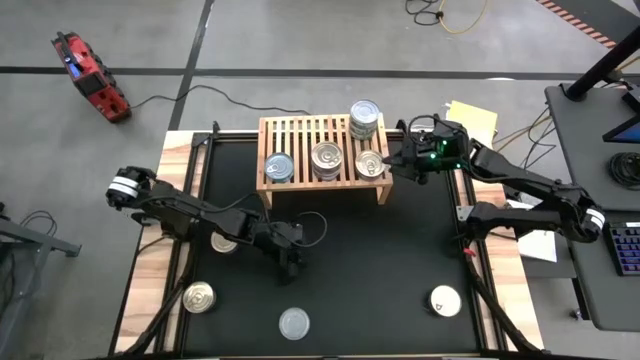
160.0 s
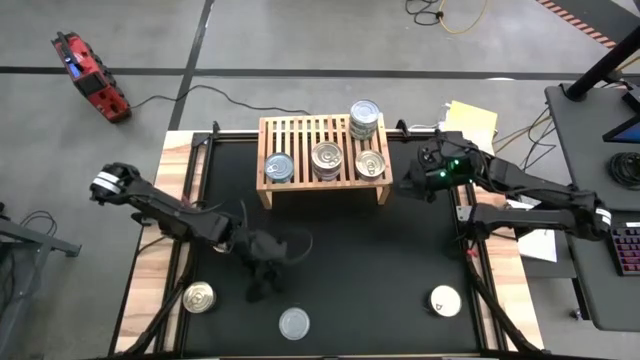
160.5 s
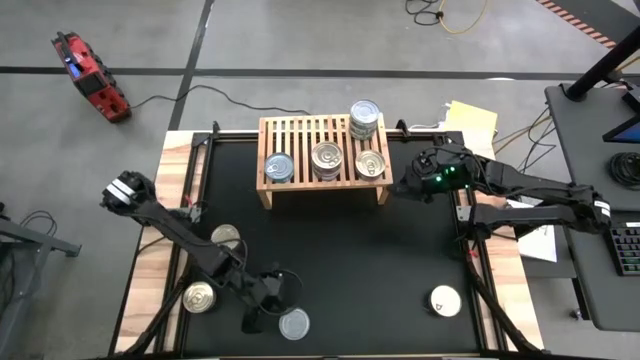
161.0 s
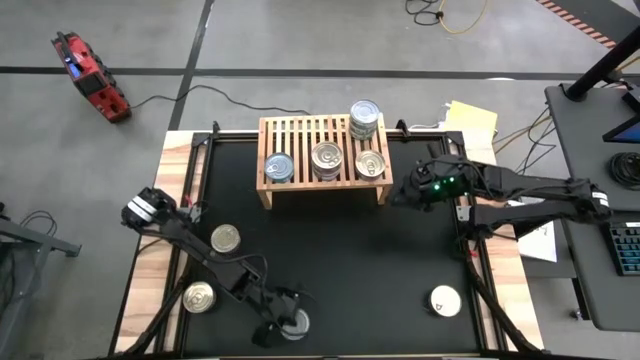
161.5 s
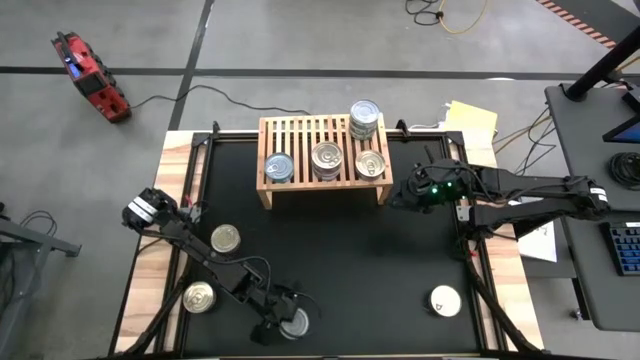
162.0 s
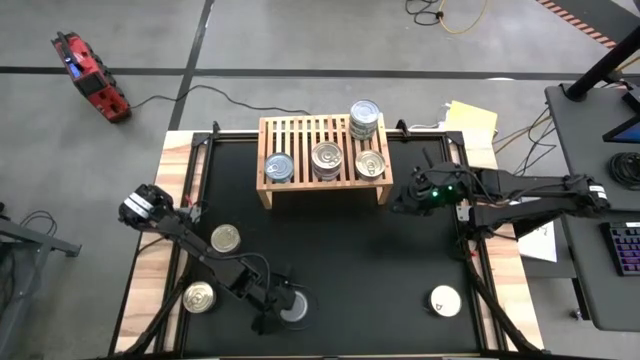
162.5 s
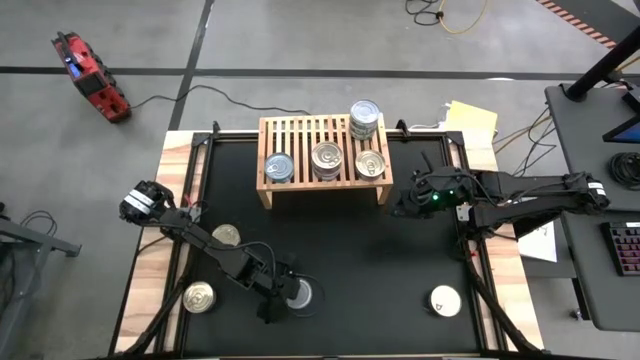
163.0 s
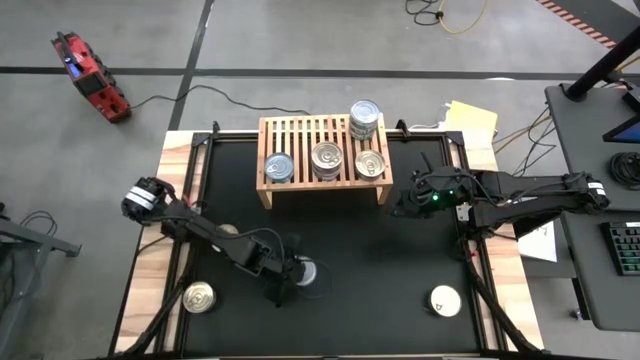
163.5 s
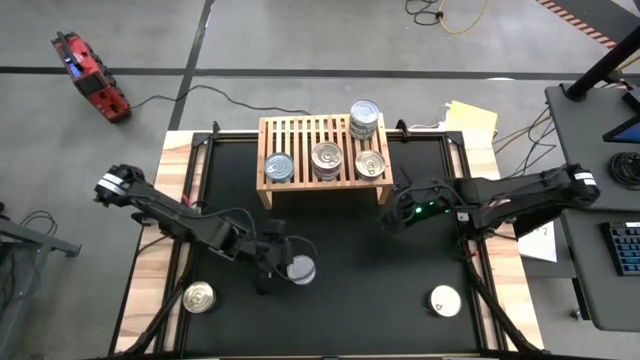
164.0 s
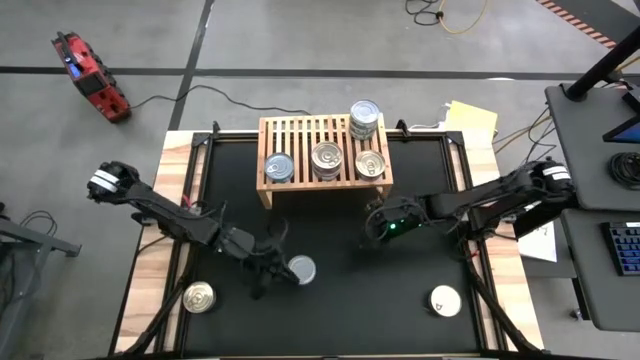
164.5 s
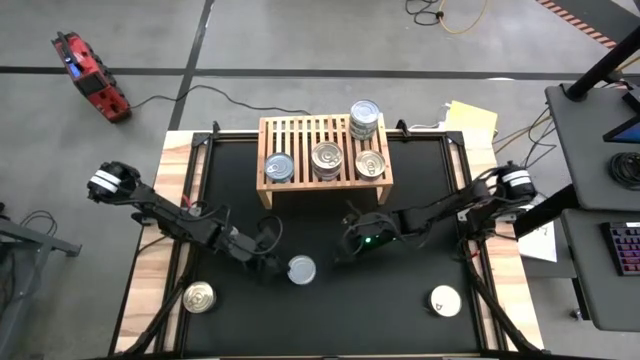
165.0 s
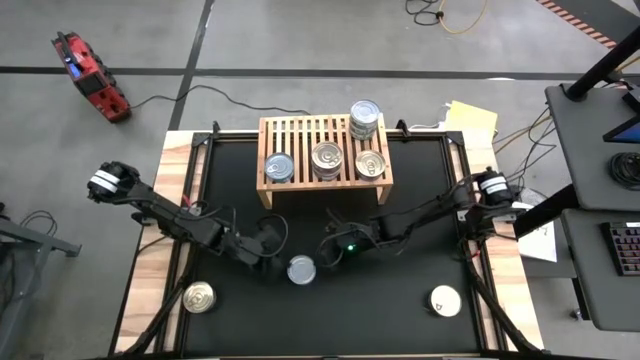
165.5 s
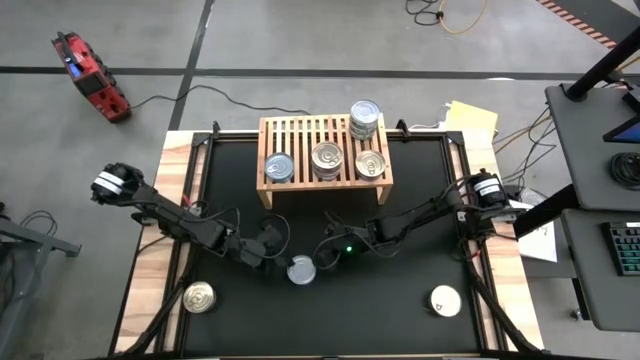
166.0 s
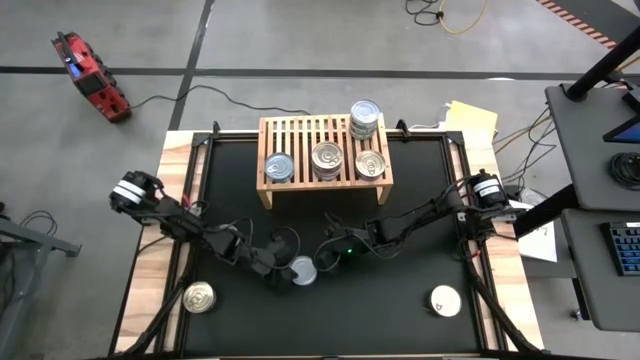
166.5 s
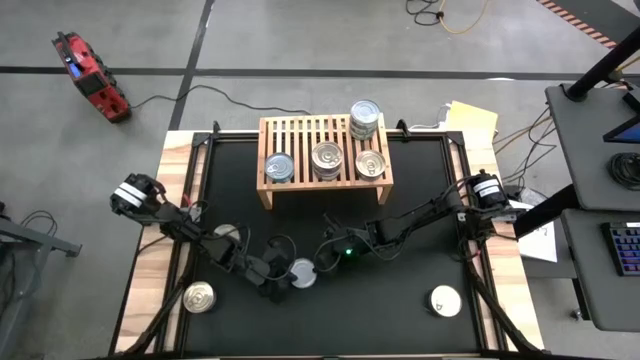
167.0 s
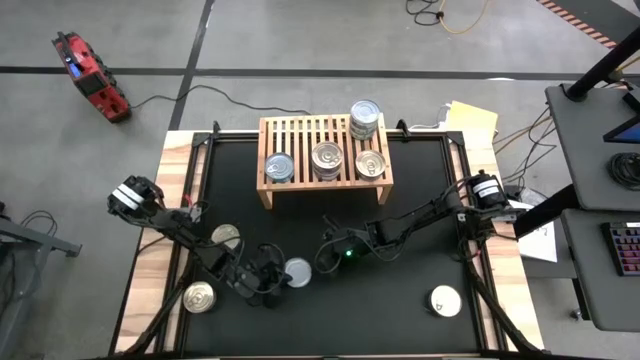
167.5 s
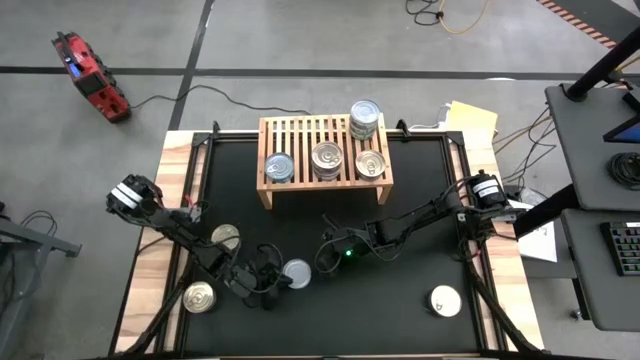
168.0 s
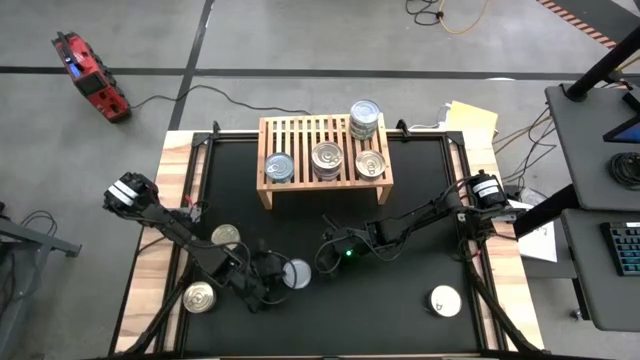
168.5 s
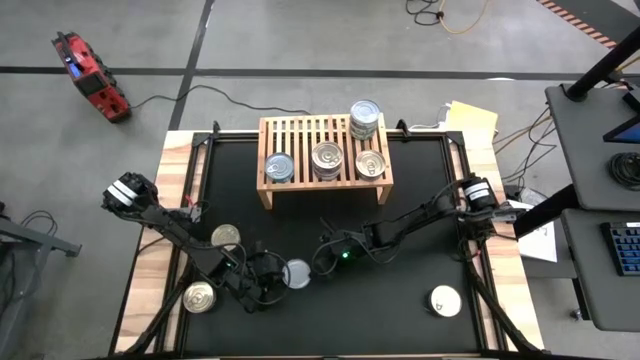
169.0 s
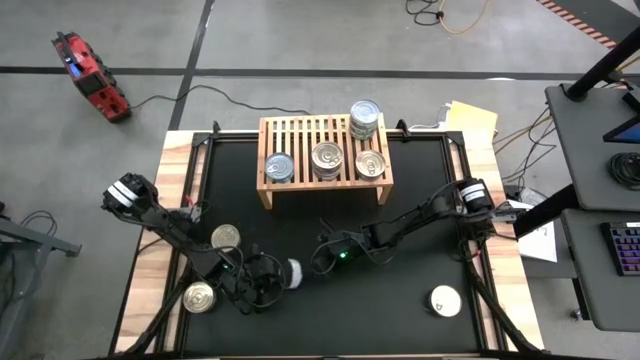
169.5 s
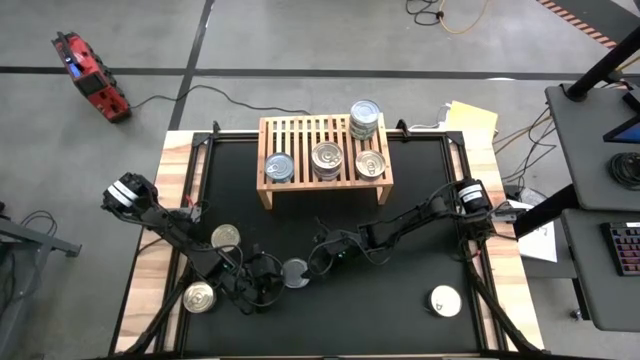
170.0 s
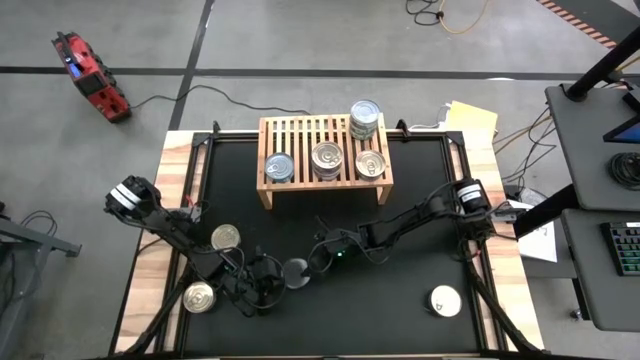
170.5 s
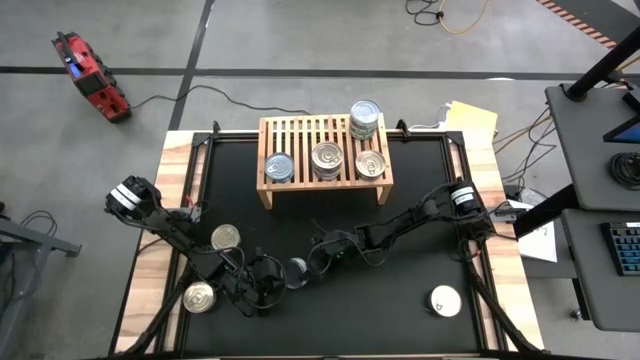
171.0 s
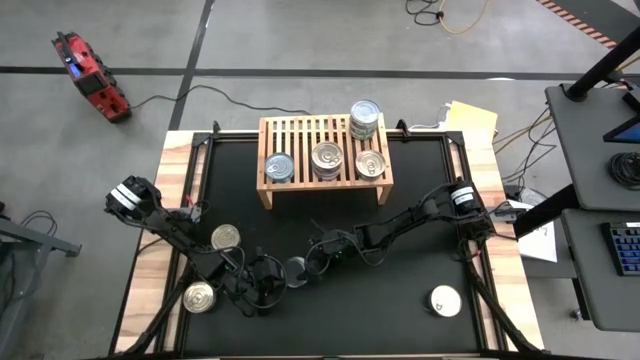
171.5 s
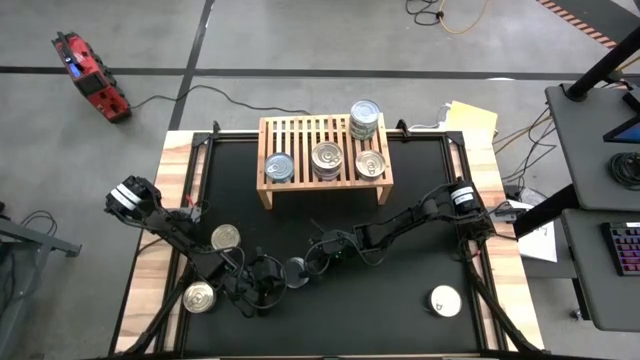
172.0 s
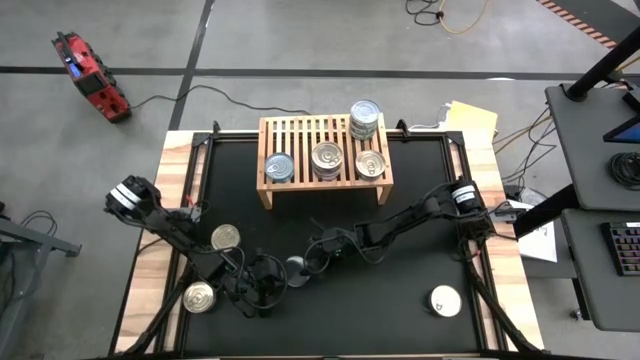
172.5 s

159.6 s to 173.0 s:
Task: Stack canned seafood by type on shelf
Stack the green white tuna can on top of the green white tuna can on the shelf

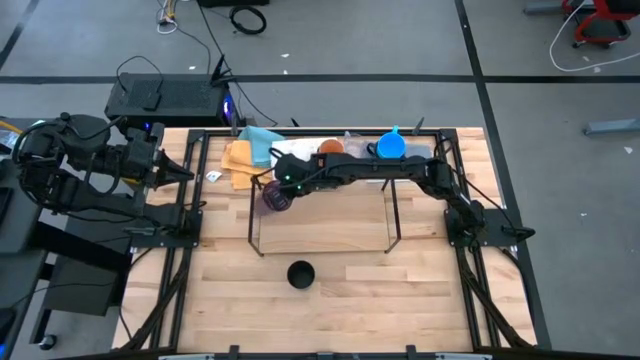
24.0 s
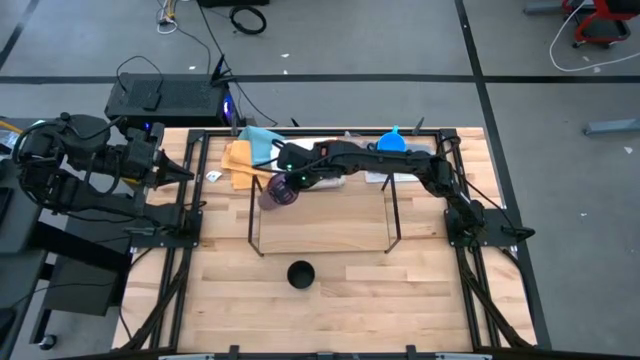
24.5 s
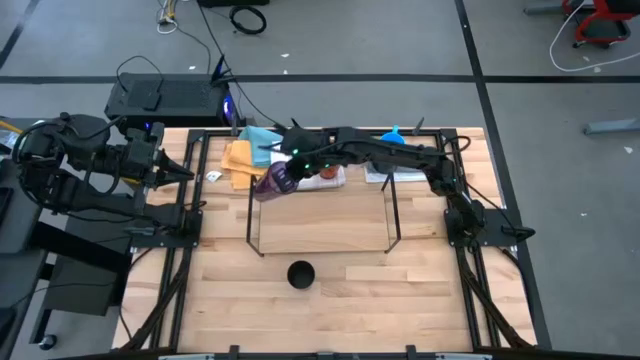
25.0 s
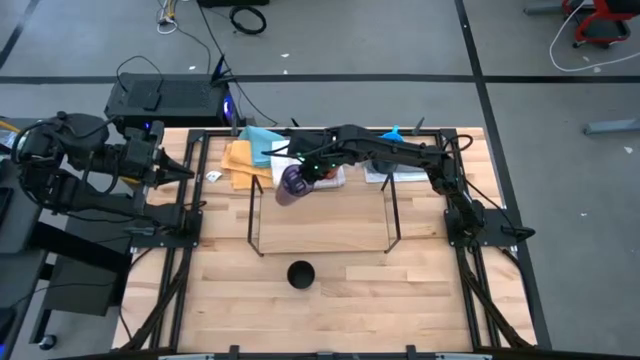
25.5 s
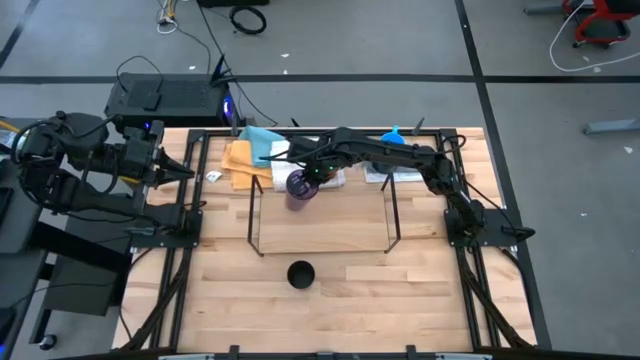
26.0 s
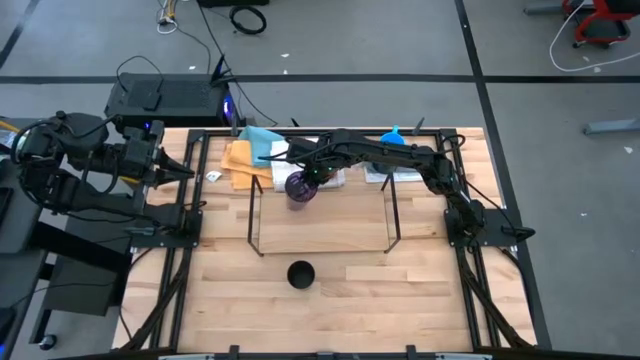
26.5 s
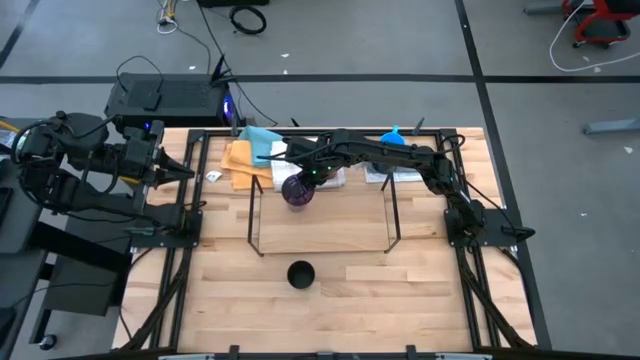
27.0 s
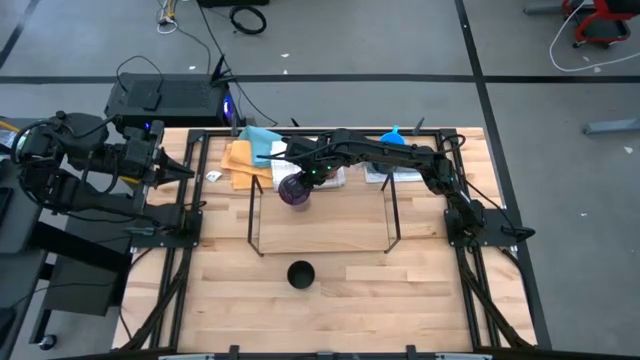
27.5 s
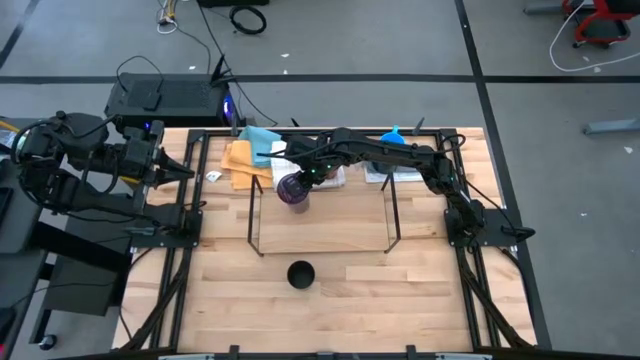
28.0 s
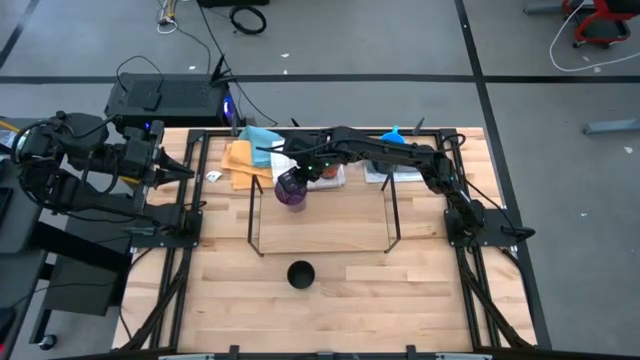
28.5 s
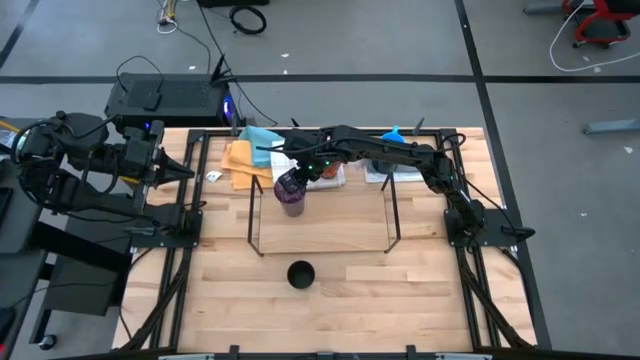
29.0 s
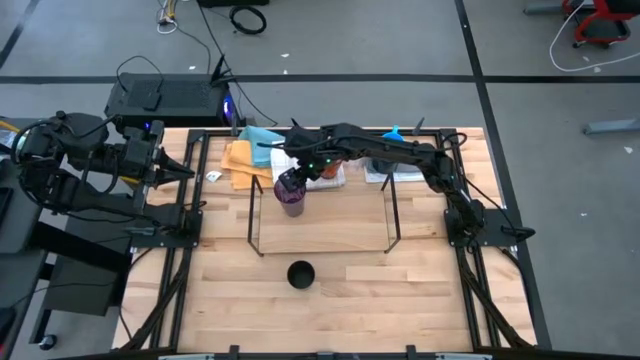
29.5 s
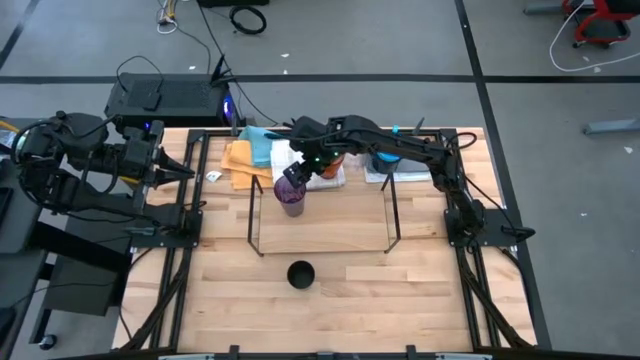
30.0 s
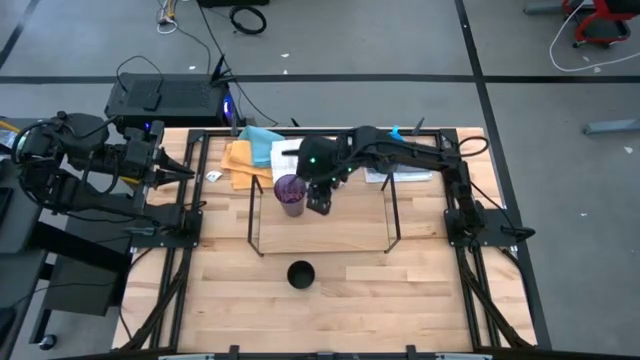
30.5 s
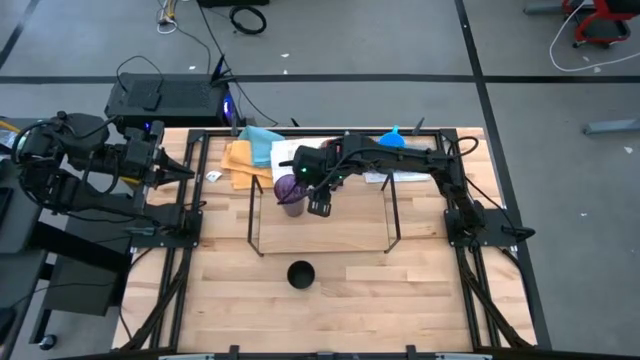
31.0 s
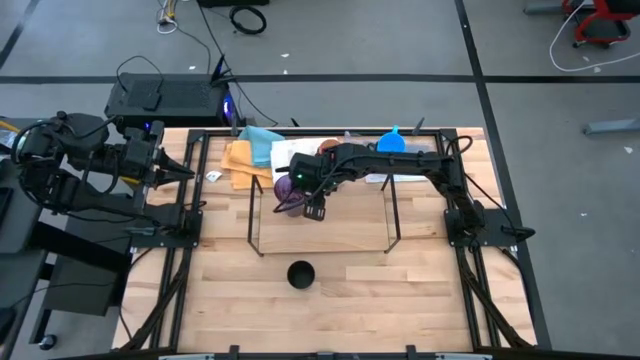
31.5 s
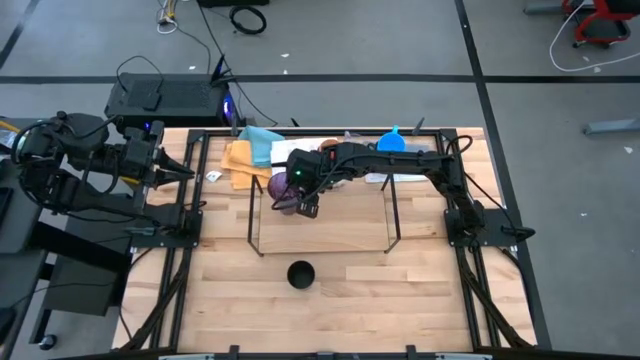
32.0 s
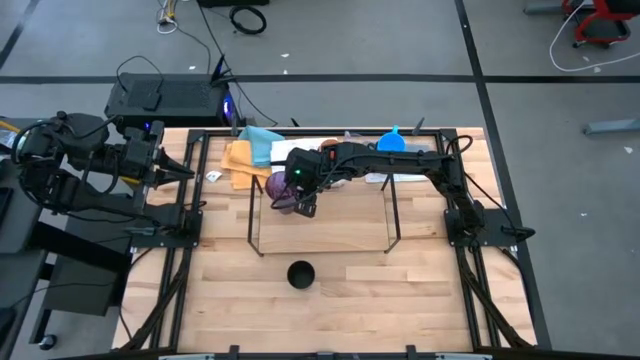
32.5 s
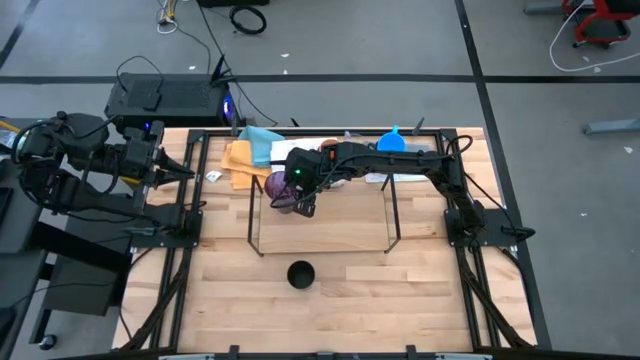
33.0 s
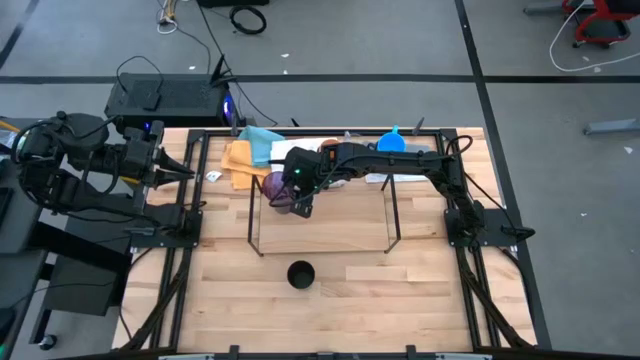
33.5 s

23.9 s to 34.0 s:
Task: Stack small to large cups/mugs on shelf
Put the purple glass on the shelf
